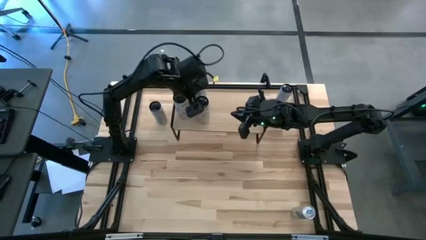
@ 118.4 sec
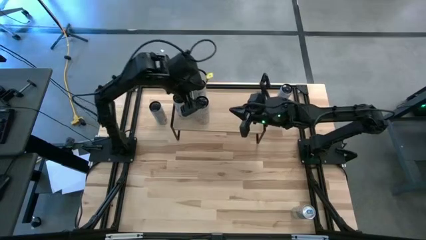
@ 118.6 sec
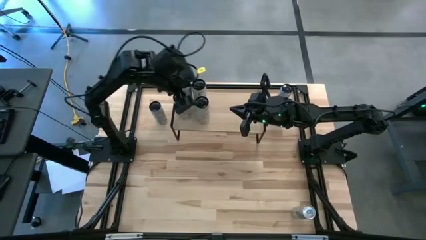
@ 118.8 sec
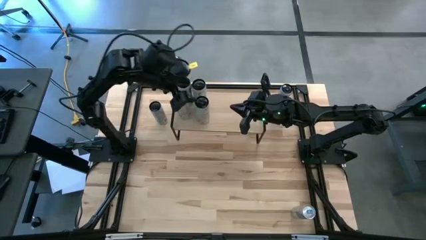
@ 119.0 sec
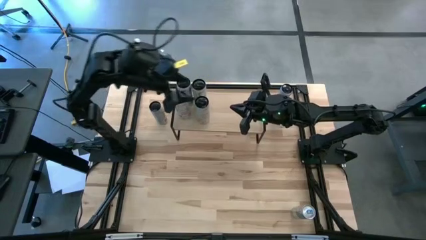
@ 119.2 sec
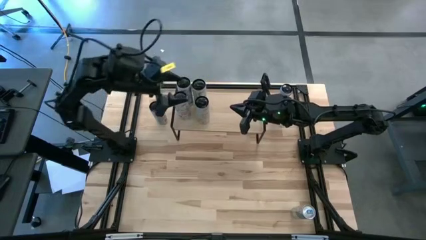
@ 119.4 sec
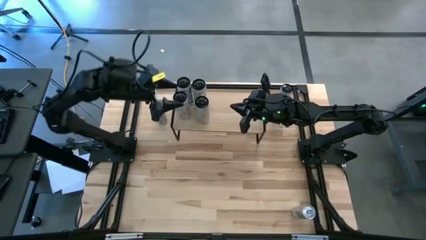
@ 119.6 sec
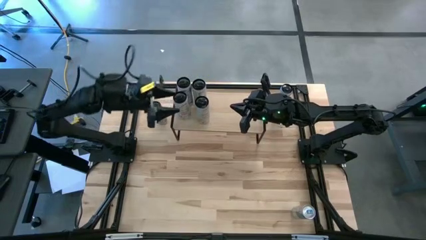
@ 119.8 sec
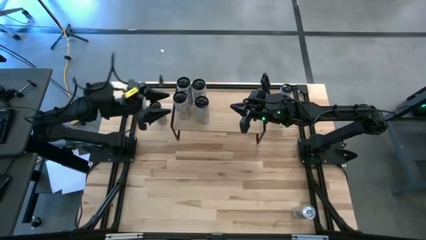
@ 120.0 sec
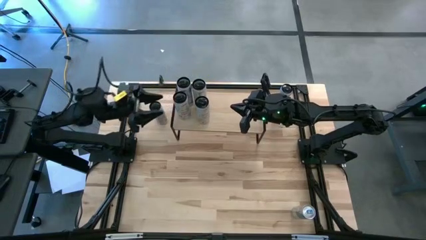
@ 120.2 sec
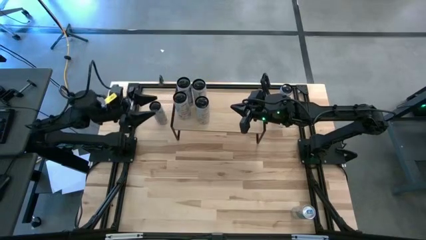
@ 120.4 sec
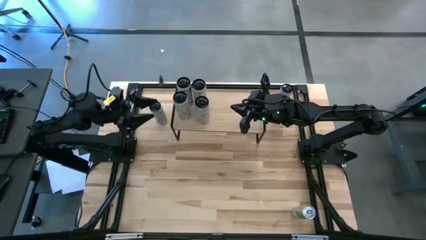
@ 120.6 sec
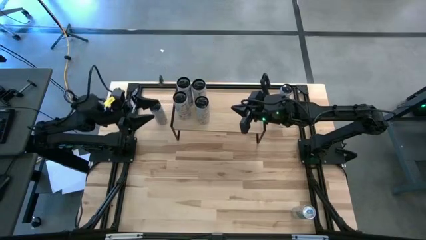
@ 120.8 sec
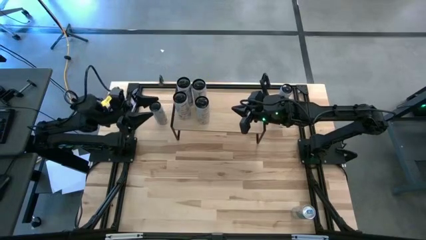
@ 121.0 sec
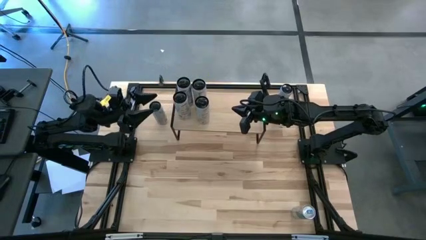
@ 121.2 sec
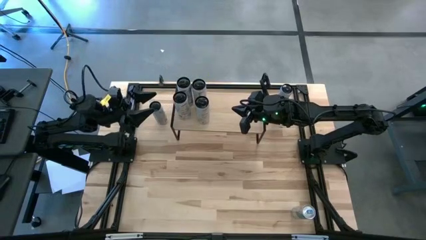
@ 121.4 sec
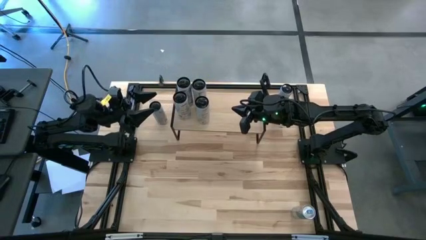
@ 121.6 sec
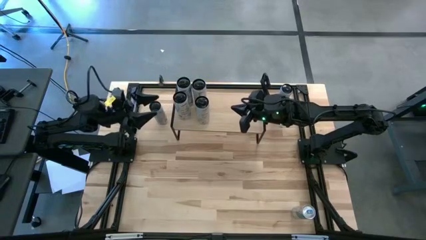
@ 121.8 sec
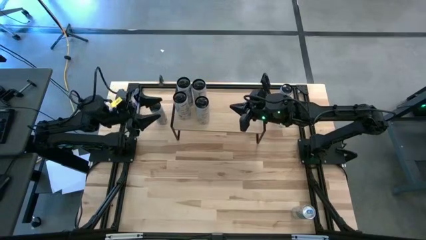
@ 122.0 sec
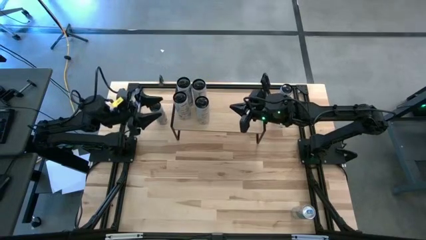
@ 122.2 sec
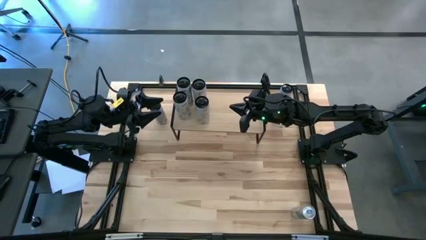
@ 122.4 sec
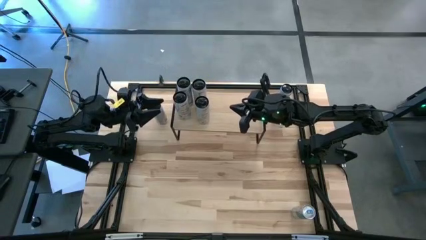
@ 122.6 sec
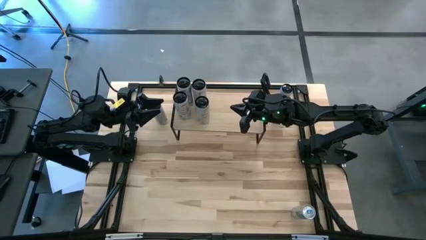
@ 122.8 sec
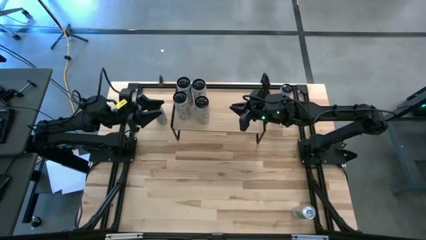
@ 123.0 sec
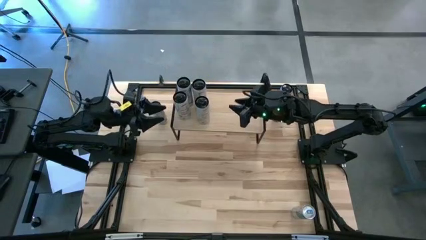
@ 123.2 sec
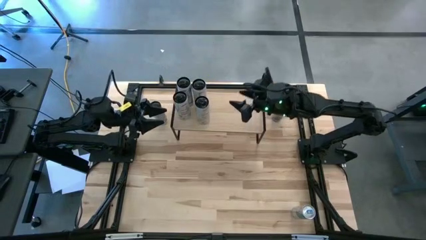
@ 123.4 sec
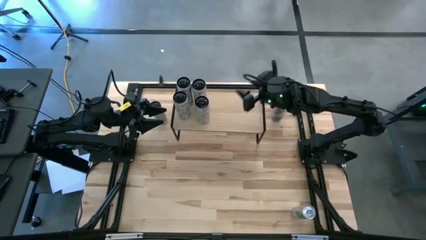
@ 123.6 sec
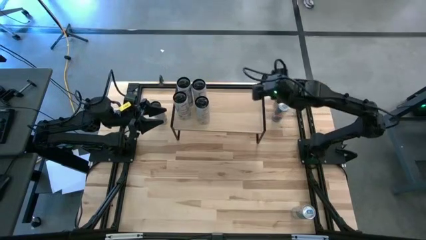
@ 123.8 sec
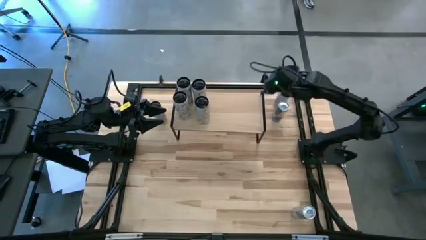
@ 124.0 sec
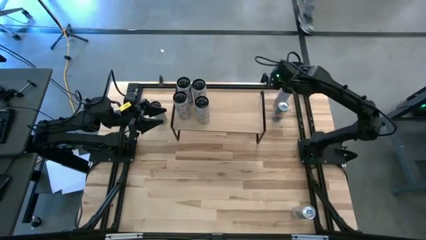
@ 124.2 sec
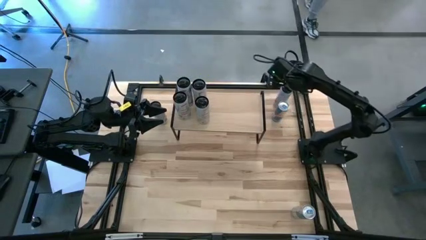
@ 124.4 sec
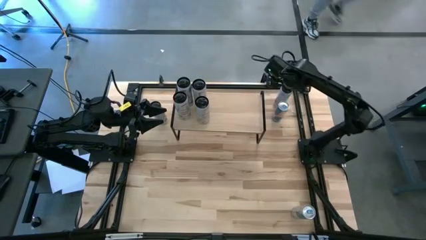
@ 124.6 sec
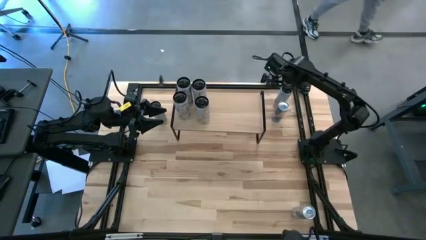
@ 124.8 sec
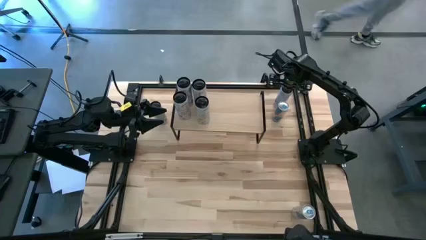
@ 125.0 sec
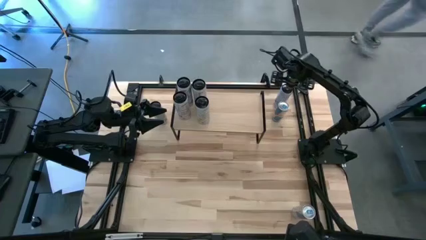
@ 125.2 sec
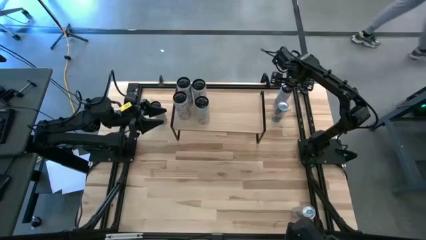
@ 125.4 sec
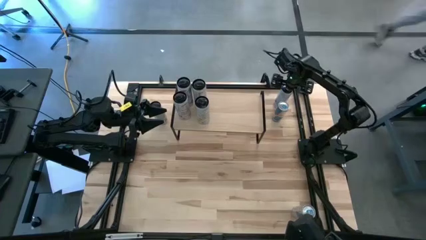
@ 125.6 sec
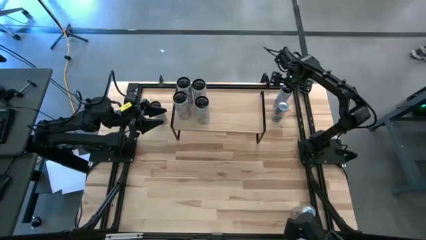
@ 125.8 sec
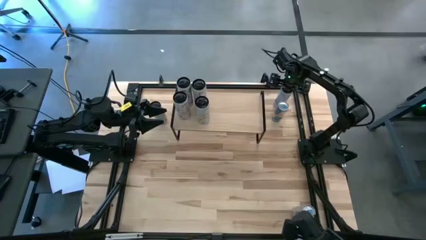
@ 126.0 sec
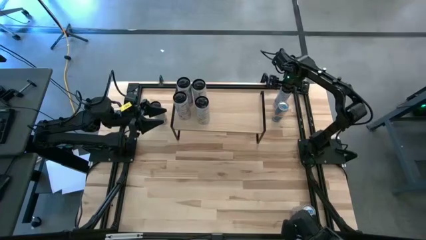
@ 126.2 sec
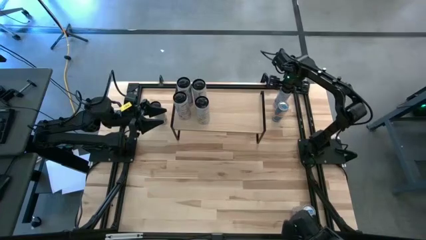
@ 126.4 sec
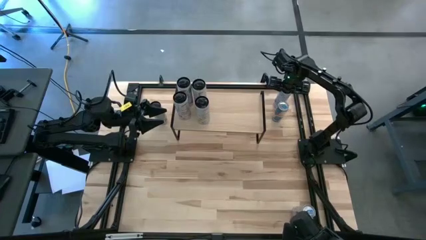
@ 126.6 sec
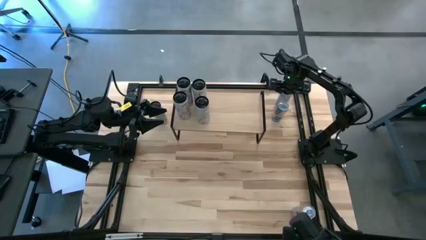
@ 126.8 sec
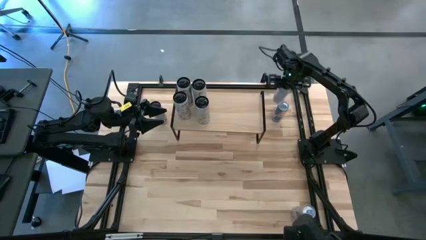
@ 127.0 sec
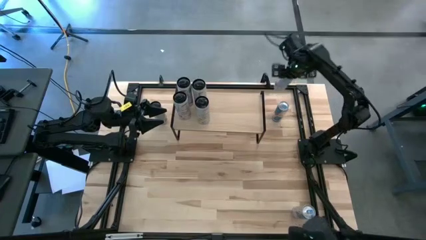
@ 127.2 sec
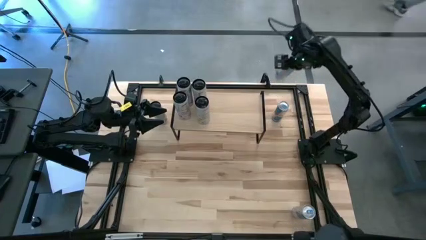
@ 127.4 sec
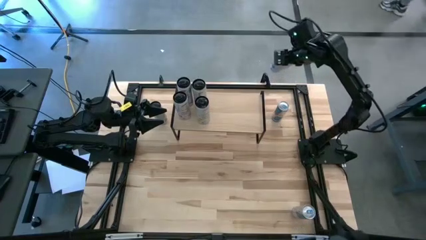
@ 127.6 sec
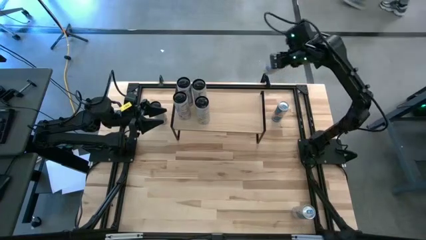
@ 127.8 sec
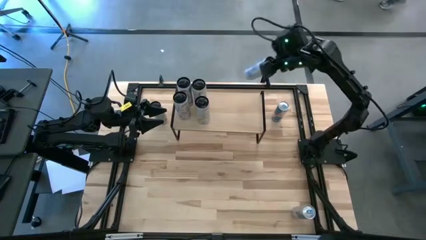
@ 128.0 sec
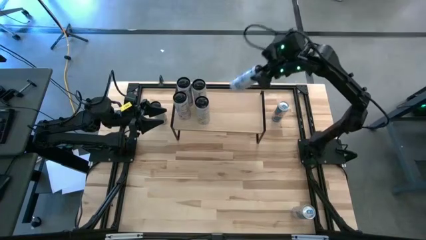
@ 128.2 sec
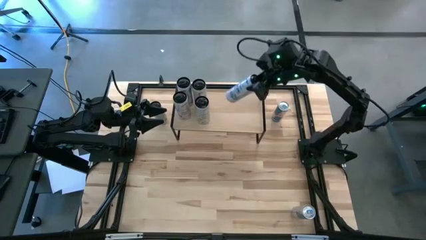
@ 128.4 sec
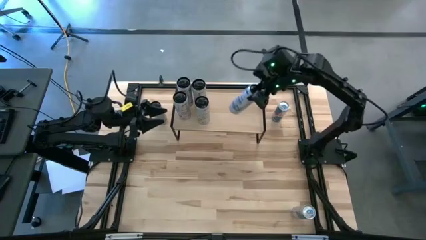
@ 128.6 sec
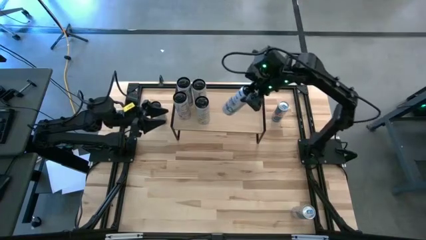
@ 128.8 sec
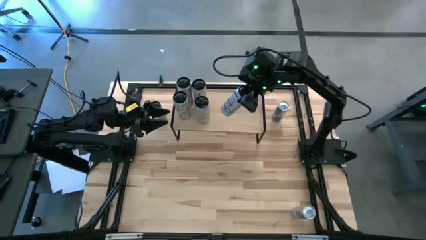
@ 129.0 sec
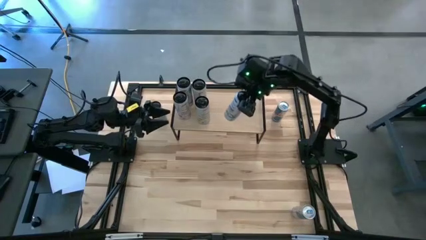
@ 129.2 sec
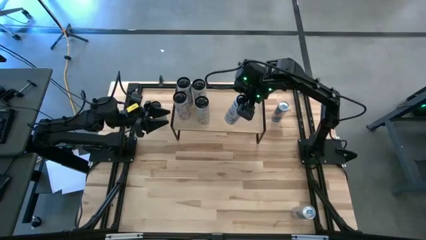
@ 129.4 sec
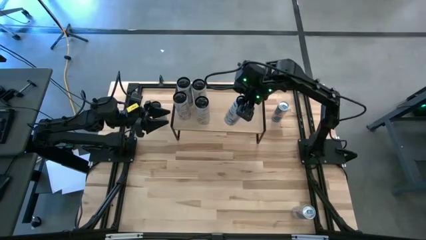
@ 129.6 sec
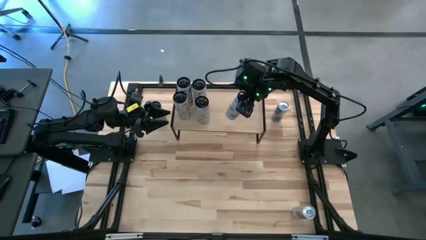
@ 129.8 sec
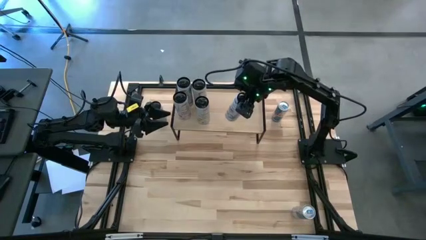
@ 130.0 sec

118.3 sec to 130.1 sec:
Task: Place canned beverage on shelf
Put the right white blue soda can on the shelf
